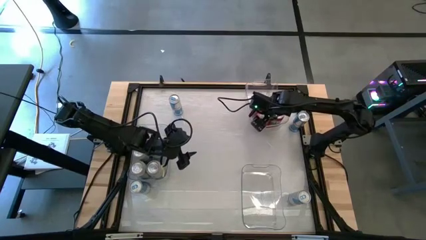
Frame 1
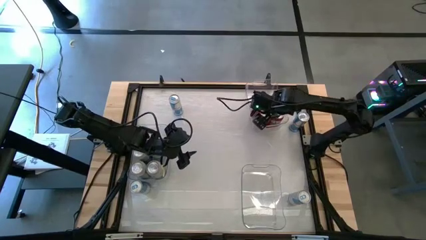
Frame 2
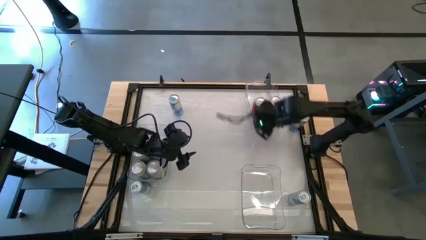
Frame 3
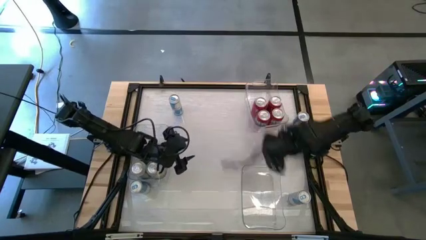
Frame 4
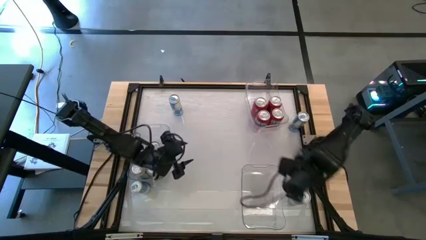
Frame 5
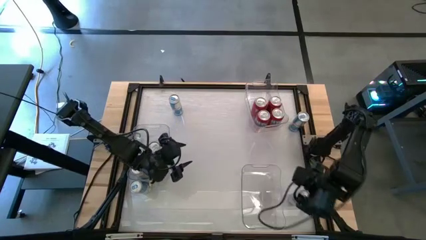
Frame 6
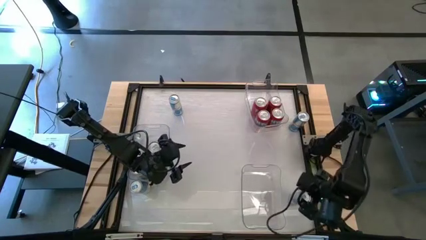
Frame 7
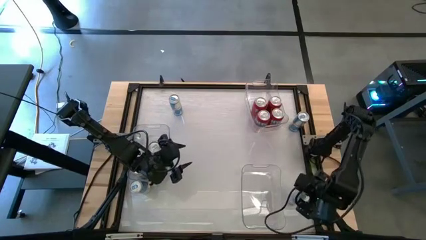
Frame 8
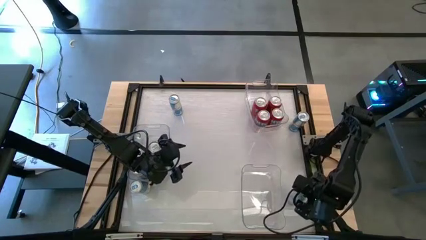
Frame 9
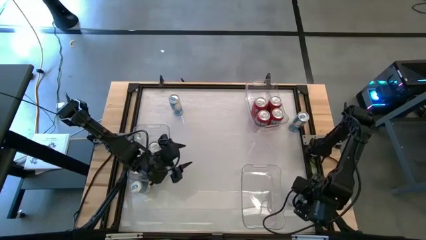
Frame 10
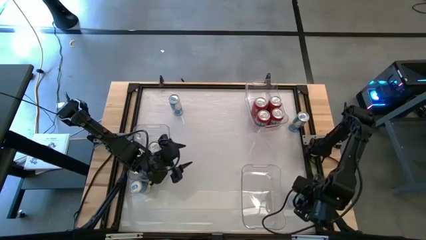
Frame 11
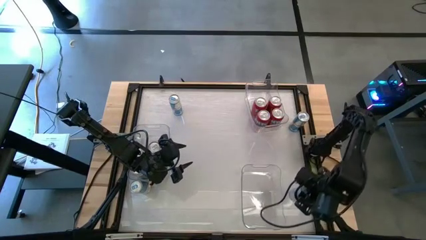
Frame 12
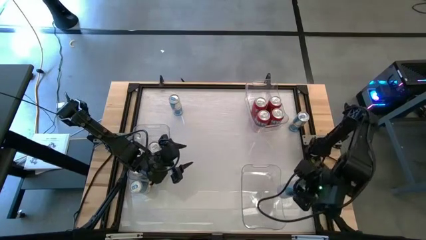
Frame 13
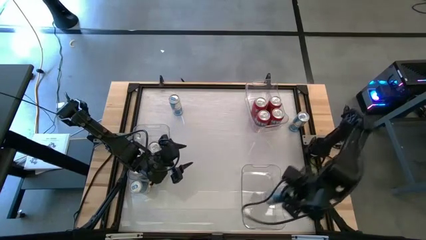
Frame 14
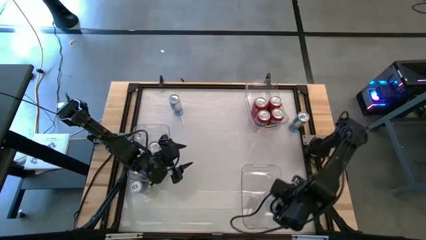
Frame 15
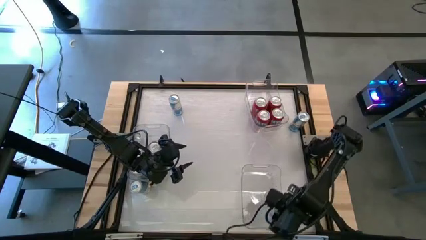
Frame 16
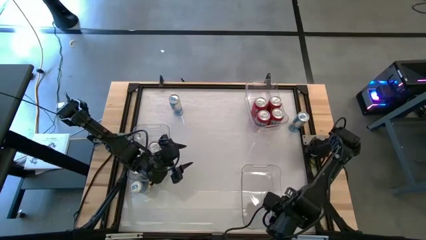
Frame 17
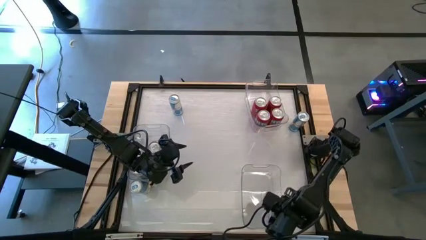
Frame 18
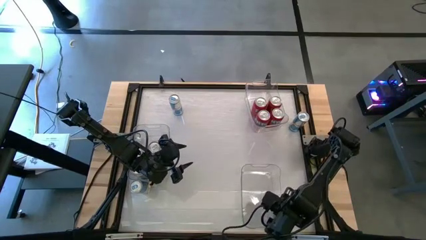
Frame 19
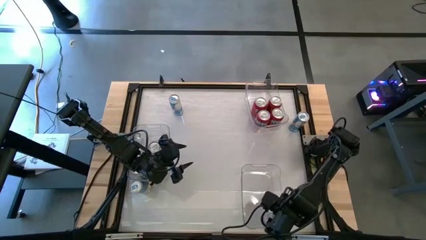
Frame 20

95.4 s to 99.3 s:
Task: Sort soda cans
Put the bottom right blue soda can into the bottom right transparent bin

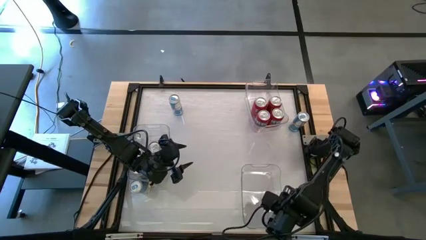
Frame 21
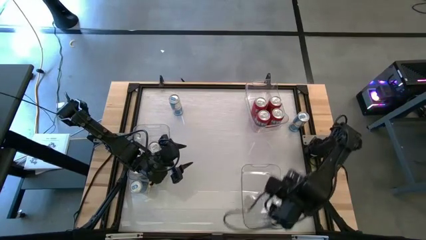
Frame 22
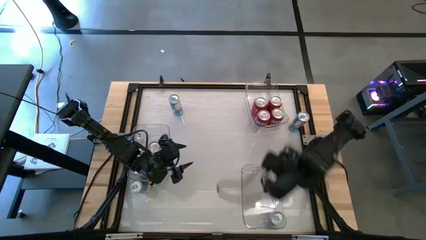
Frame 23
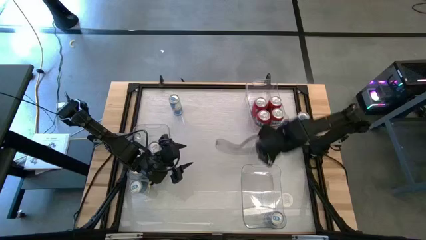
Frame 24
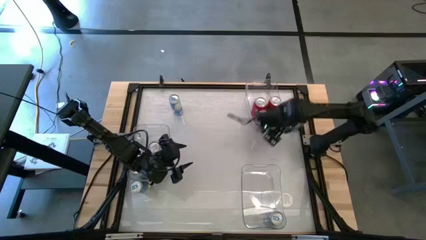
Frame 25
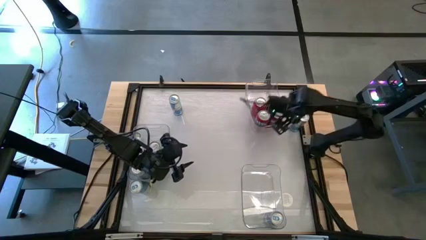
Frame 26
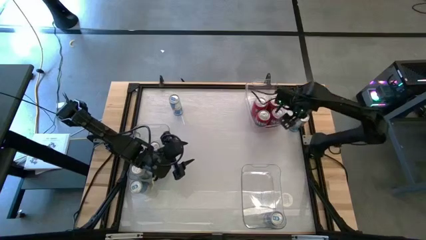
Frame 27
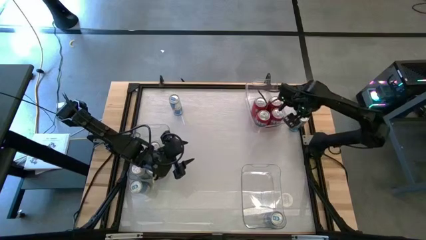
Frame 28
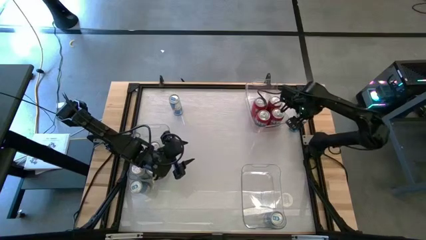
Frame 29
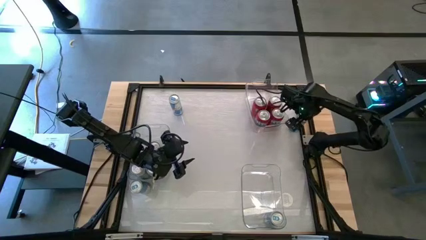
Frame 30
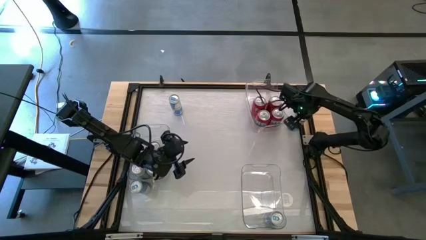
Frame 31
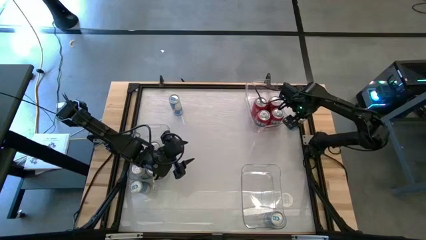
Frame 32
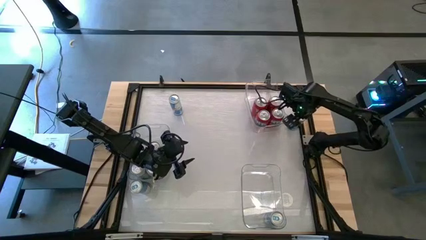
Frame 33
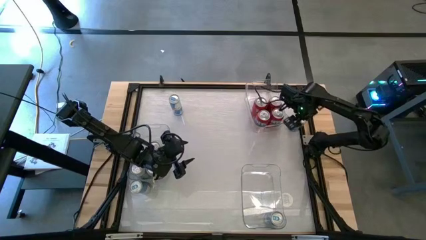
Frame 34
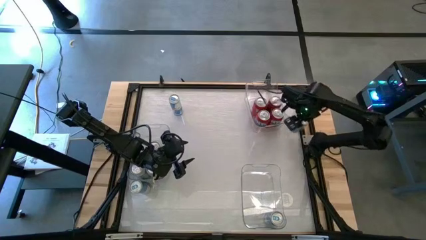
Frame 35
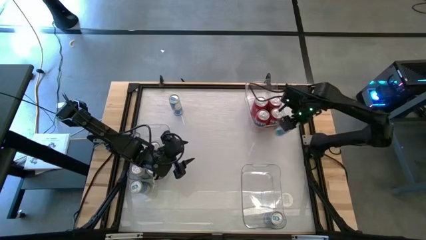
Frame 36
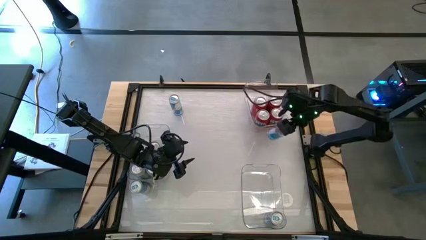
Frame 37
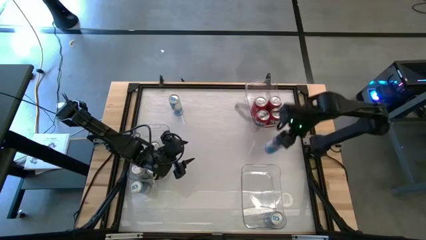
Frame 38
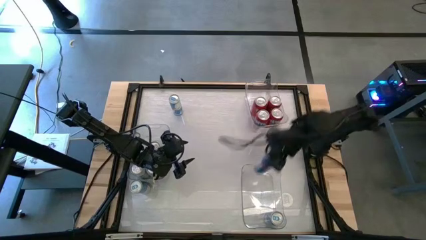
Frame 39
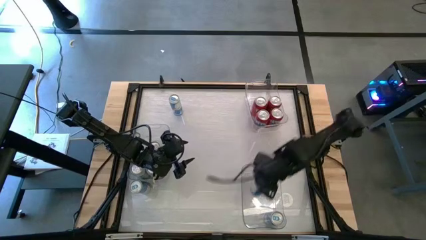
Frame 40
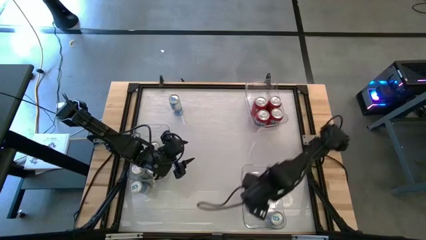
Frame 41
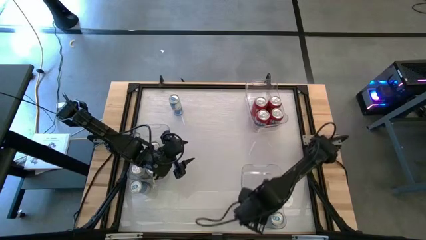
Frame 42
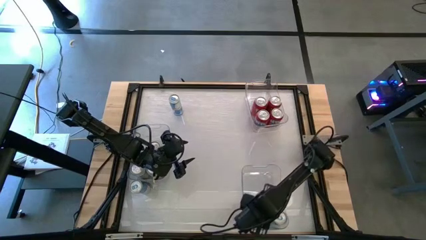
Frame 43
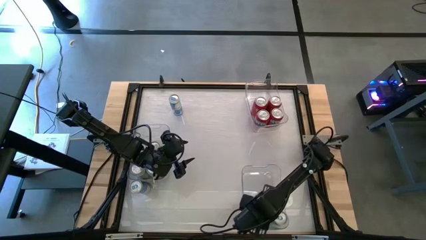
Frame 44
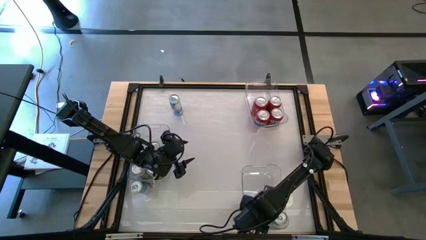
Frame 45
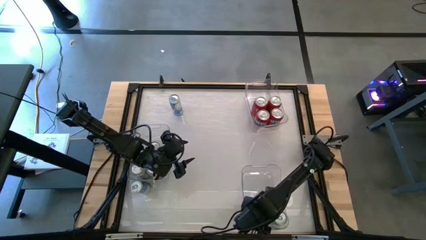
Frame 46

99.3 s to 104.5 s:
Put the top right blue soda can into the bottom right transparent bin

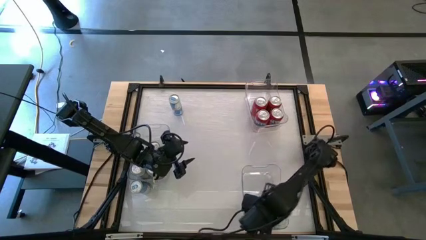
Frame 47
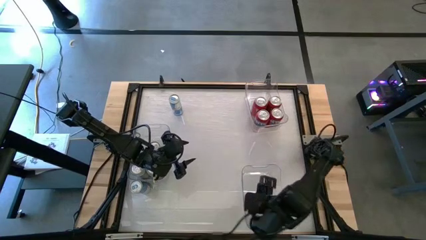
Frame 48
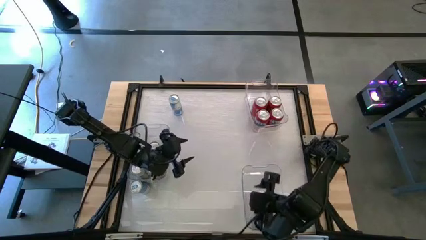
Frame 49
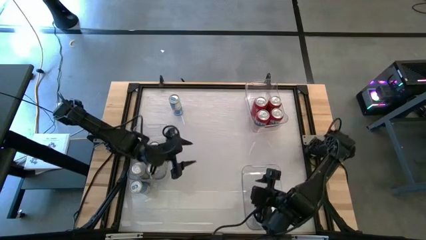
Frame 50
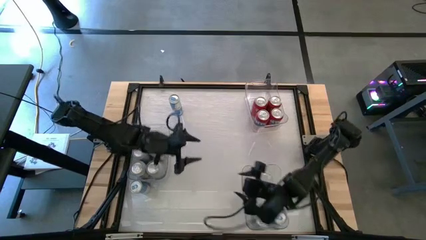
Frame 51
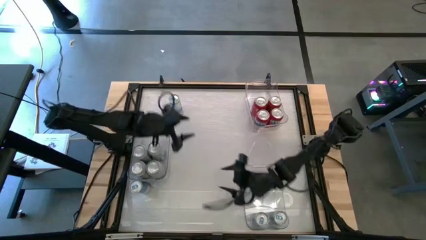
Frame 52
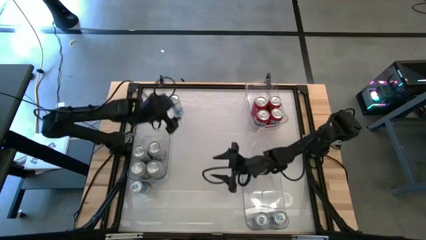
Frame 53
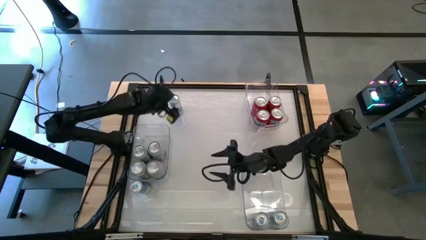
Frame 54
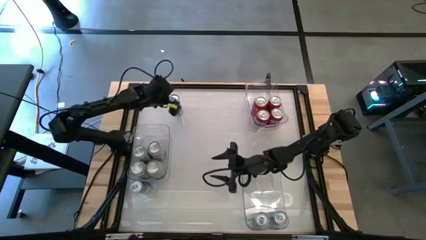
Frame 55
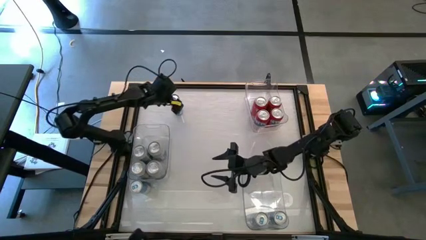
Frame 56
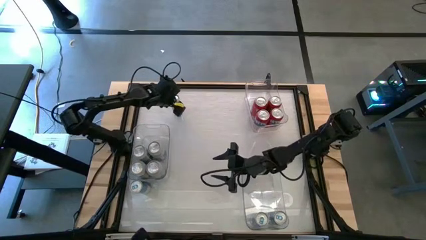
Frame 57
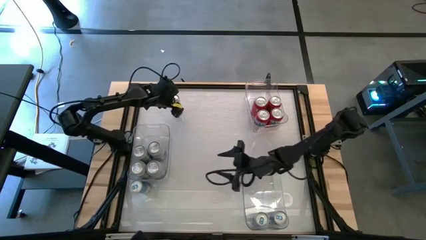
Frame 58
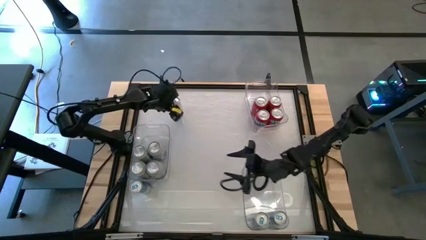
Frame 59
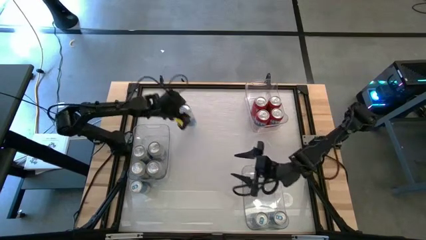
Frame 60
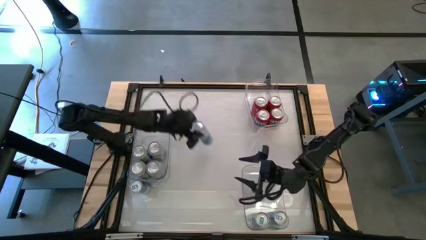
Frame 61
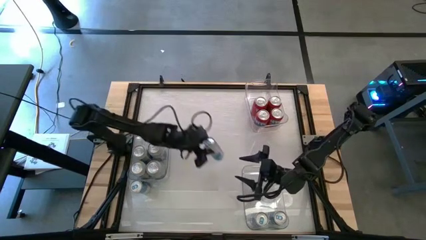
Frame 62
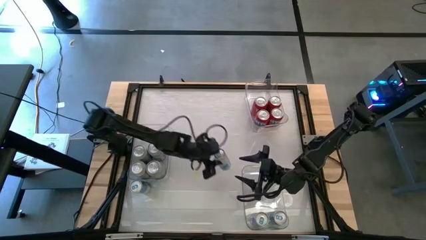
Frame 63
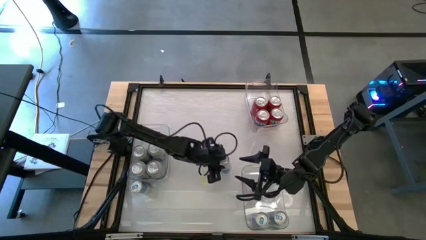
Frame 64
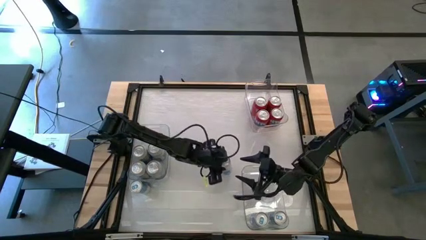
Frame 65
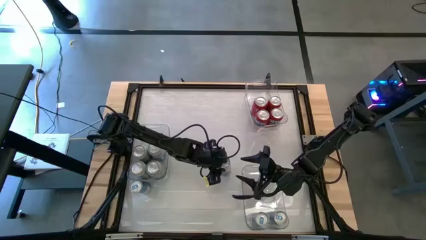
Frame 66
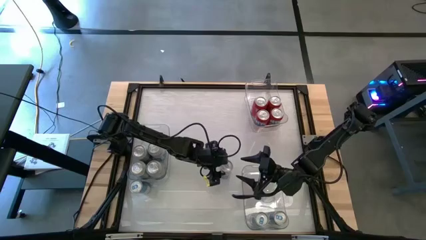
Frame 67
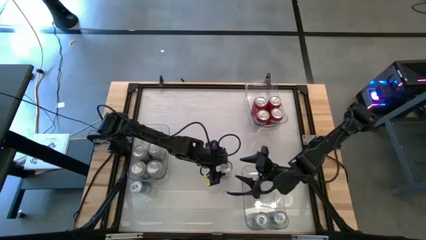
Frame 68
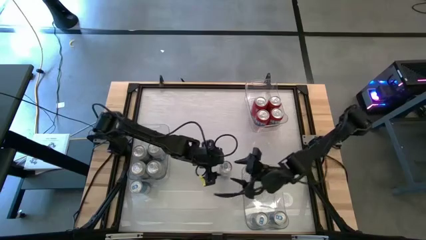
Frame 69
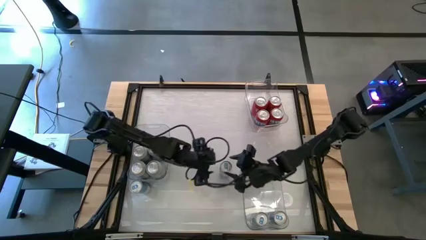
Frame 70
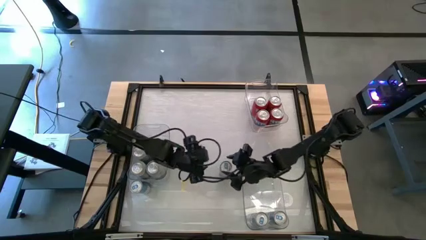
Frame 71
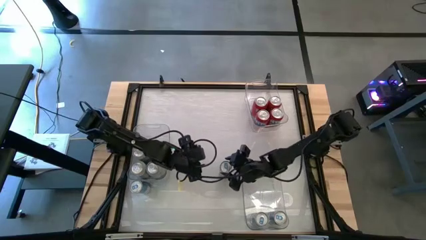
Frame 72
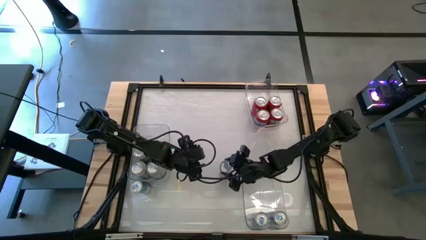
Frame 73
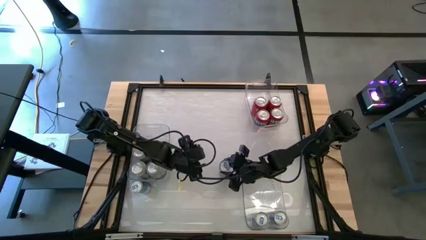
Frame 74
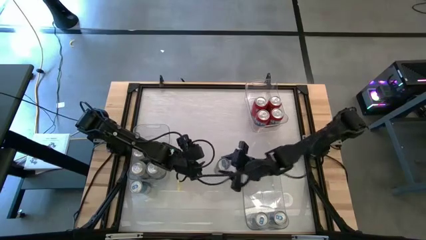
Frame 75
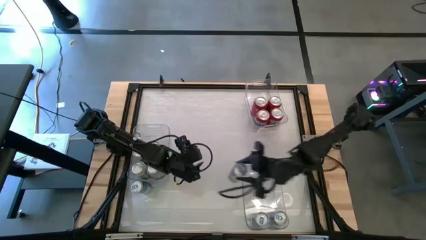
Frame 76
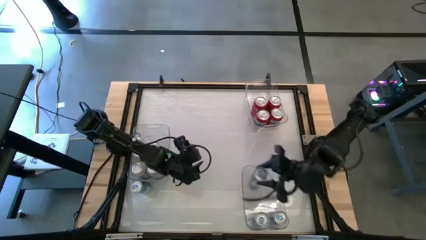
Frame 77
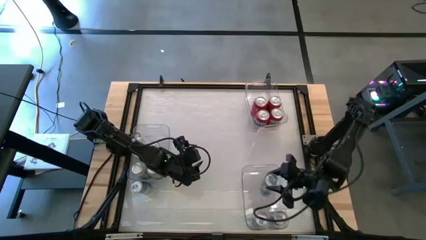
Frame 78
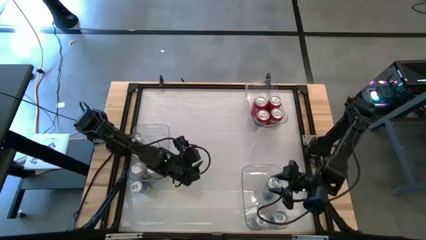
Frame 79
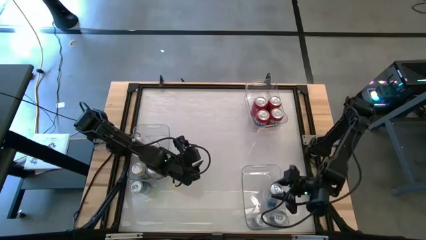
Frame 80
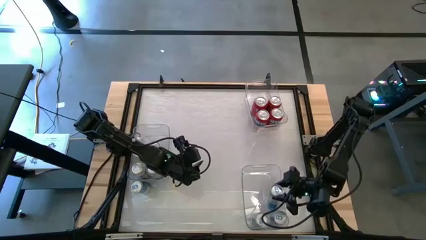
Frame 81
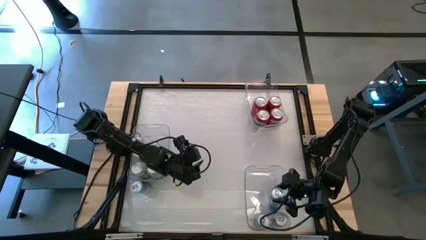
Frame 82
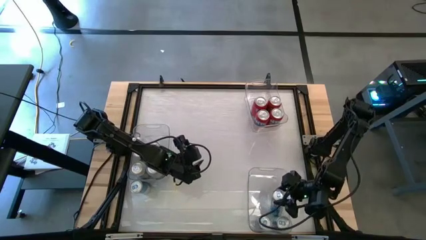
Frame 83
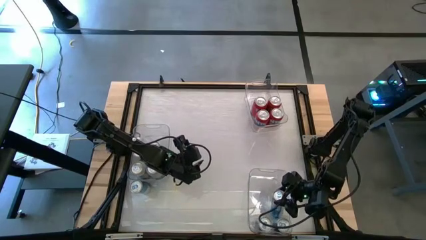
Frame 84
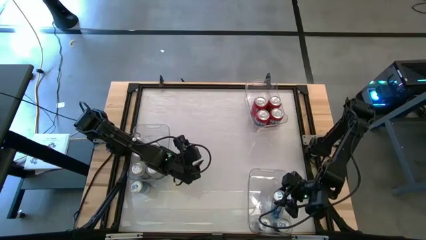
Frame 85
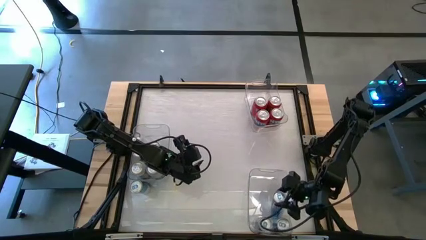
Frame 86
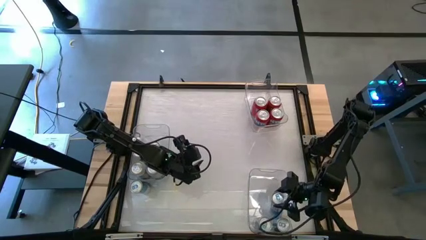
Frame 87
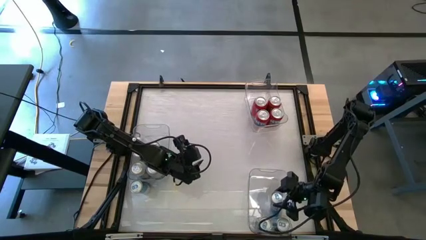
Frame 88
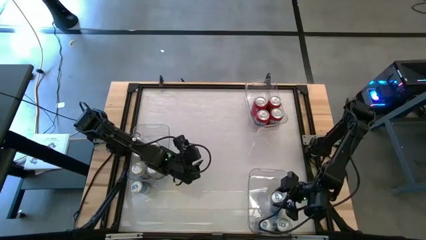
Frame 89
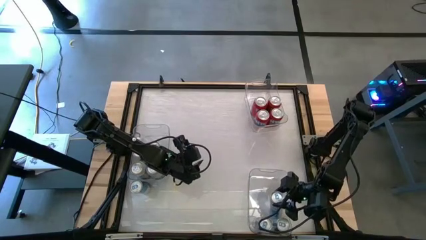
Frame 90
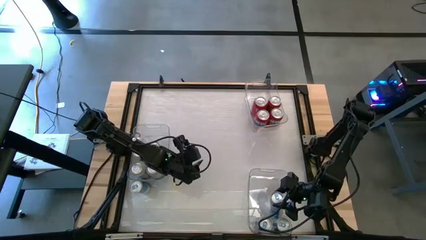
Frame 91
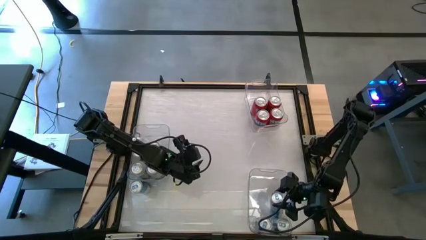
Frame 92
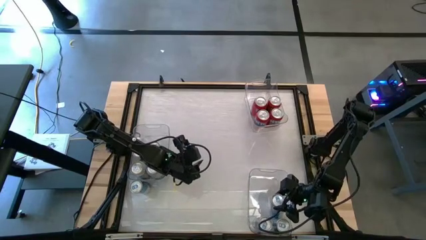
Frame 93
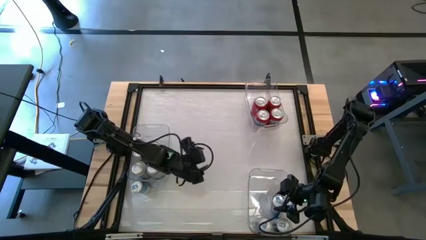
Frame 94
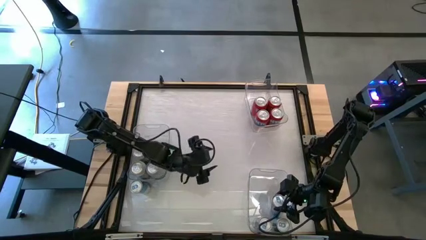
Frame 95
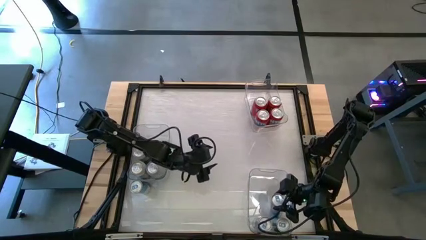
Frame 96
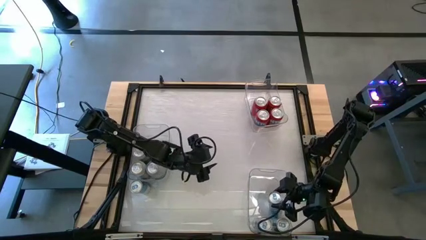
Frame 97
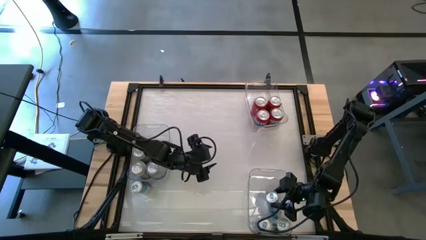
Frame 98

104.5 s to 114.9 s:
Put the top blue soda can into the bottom right transparent bin
